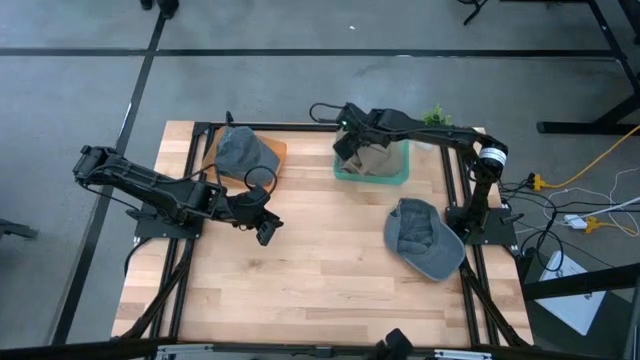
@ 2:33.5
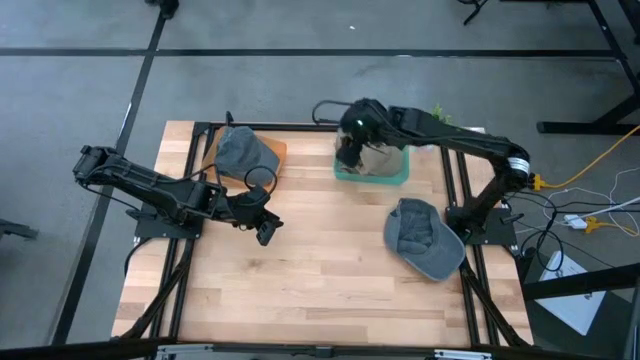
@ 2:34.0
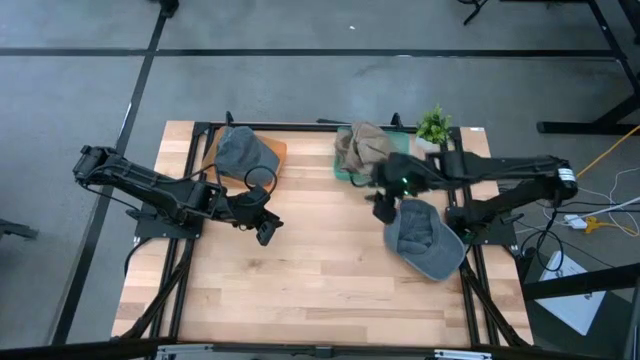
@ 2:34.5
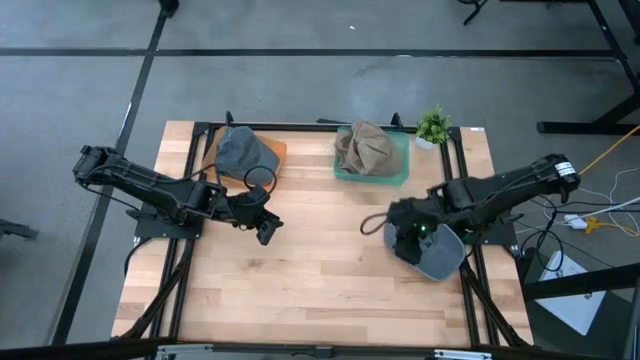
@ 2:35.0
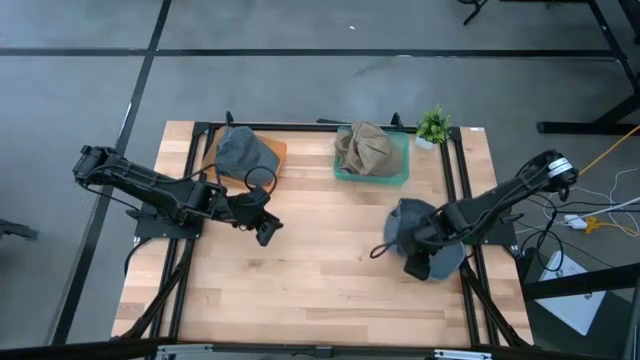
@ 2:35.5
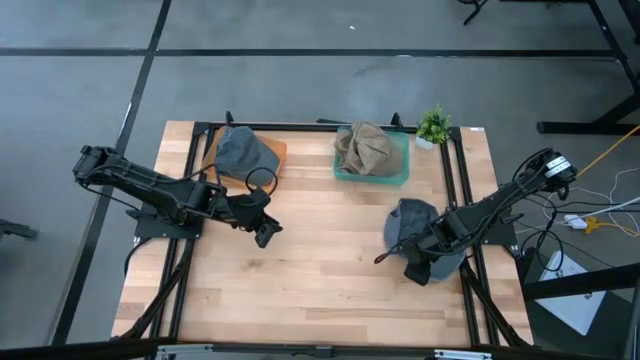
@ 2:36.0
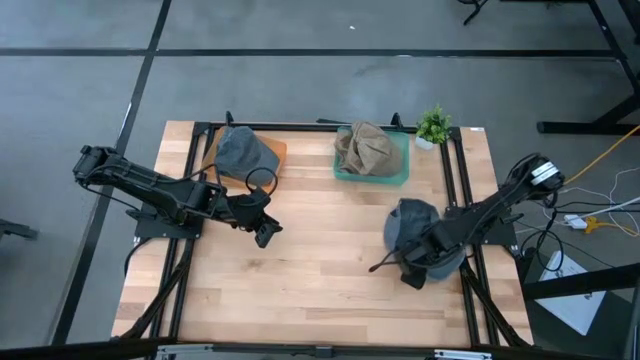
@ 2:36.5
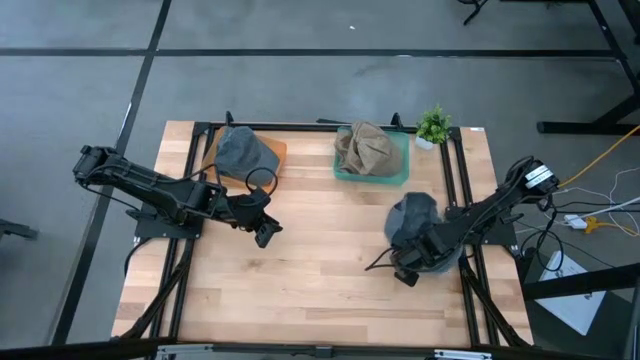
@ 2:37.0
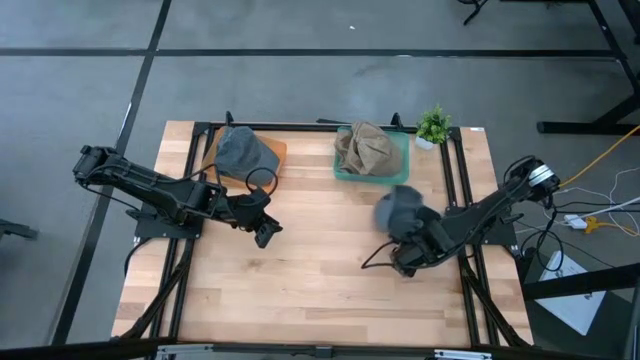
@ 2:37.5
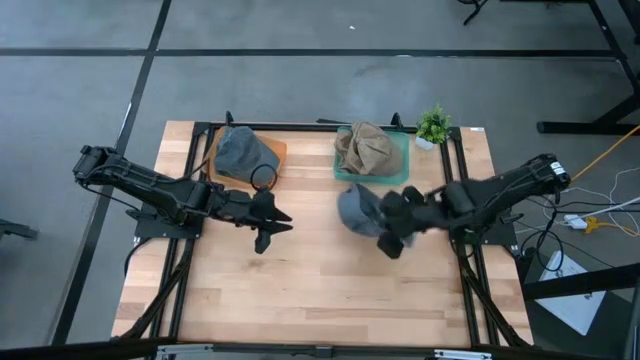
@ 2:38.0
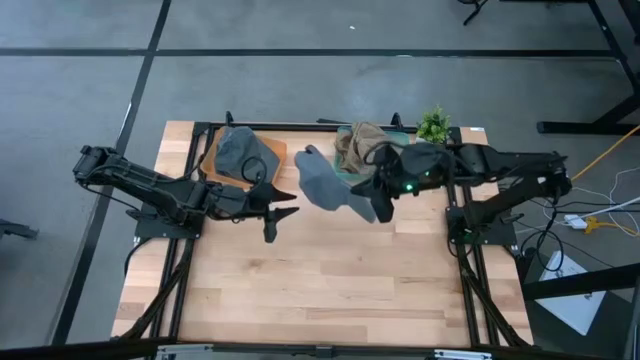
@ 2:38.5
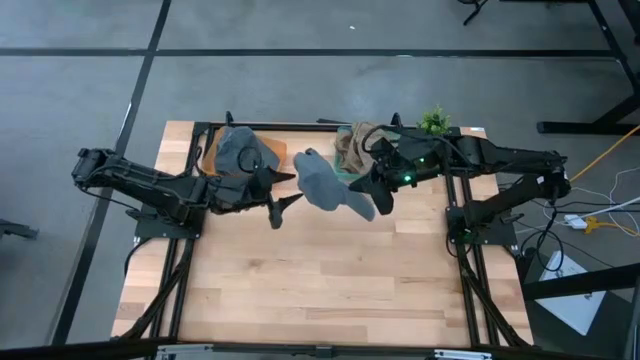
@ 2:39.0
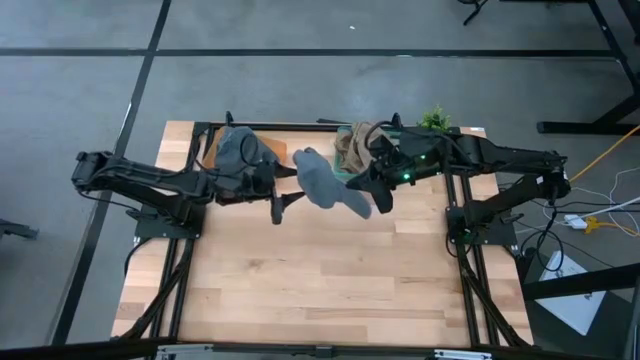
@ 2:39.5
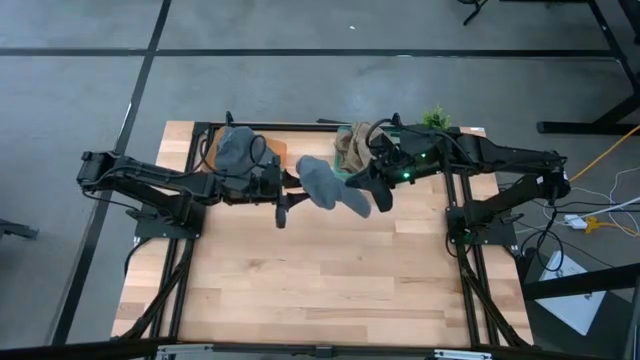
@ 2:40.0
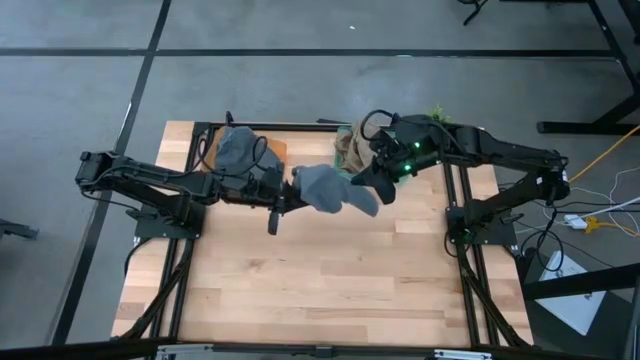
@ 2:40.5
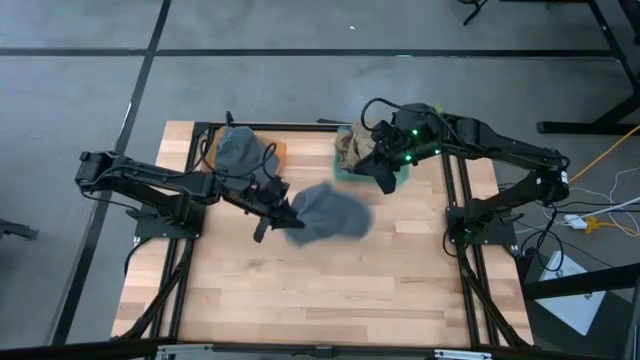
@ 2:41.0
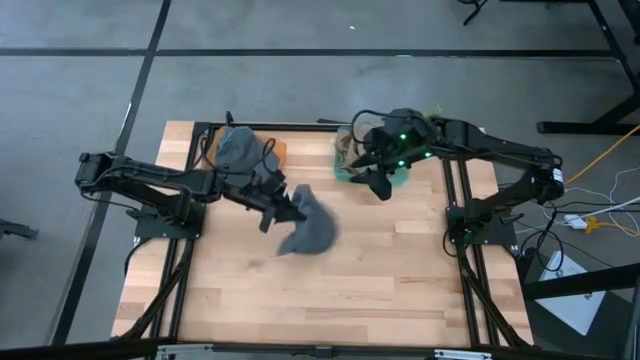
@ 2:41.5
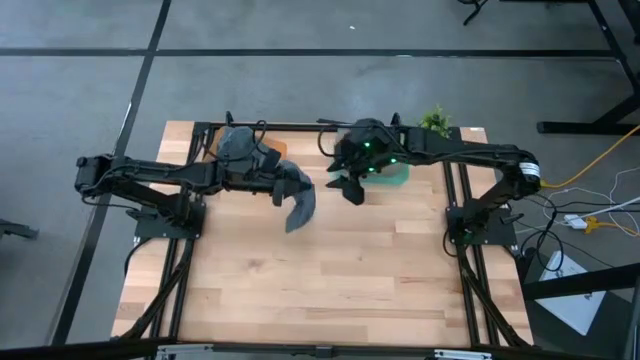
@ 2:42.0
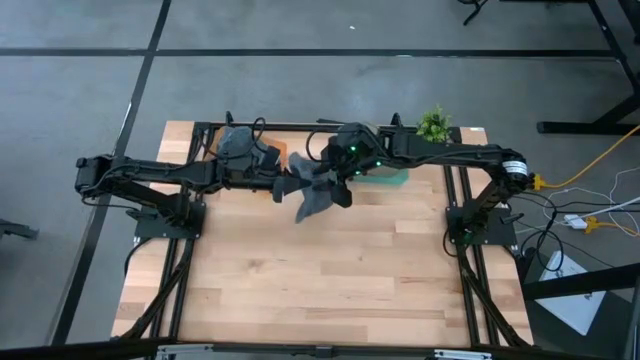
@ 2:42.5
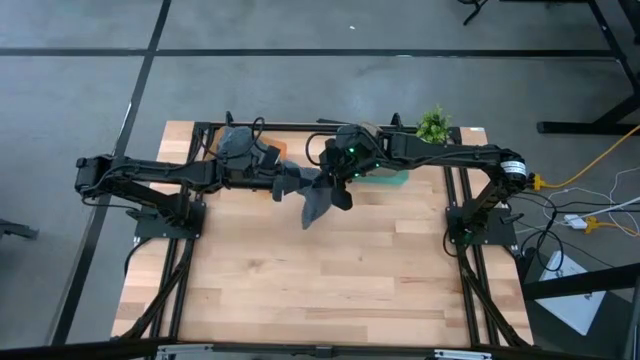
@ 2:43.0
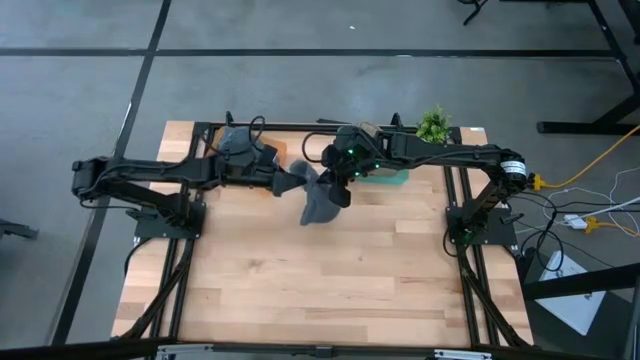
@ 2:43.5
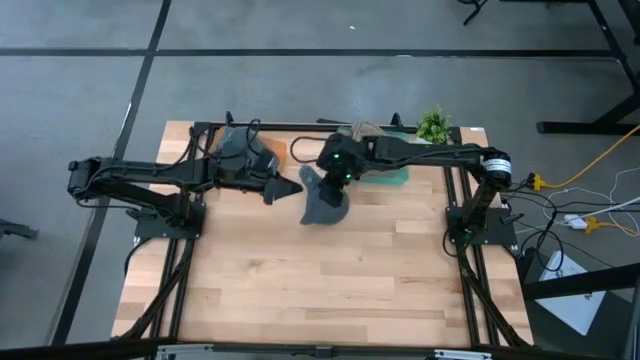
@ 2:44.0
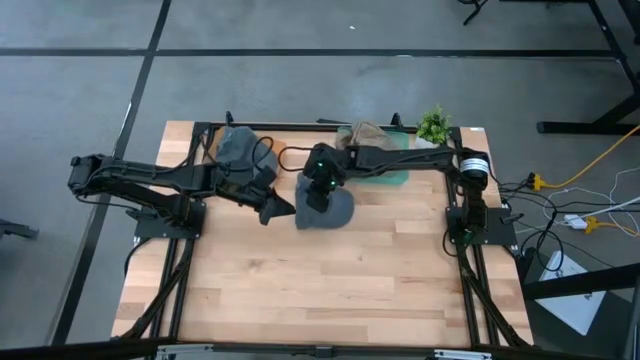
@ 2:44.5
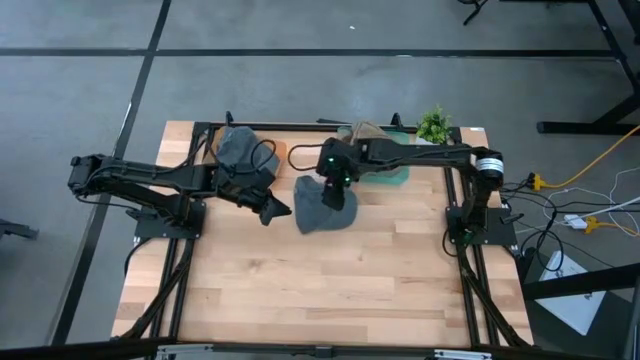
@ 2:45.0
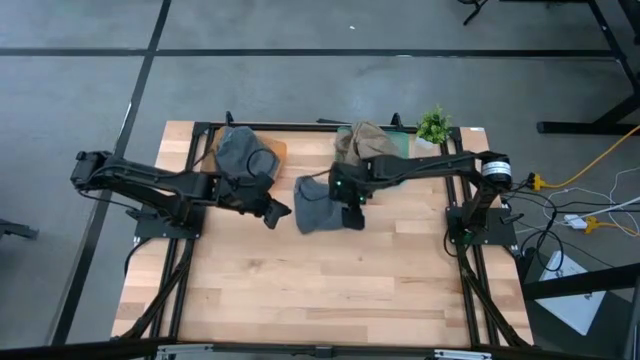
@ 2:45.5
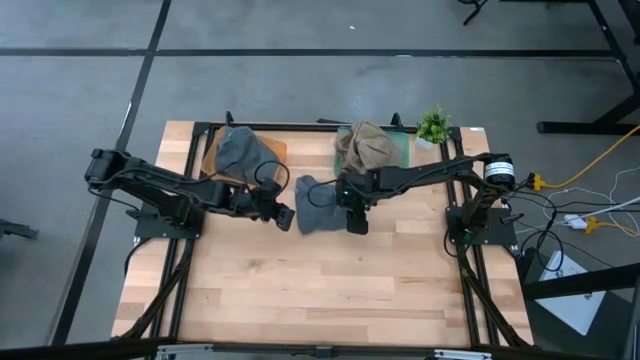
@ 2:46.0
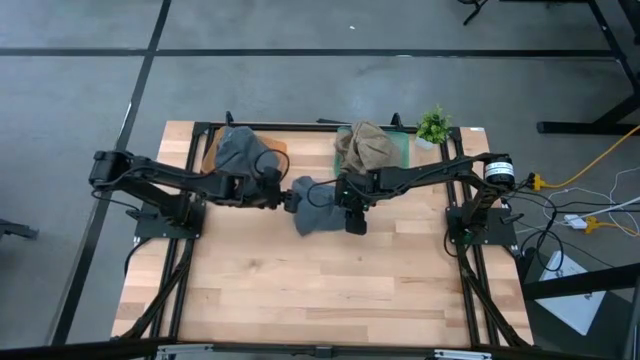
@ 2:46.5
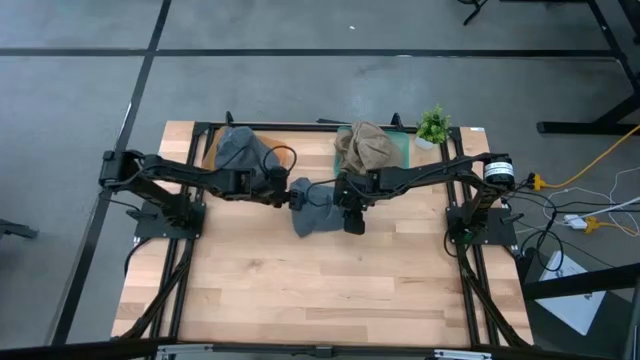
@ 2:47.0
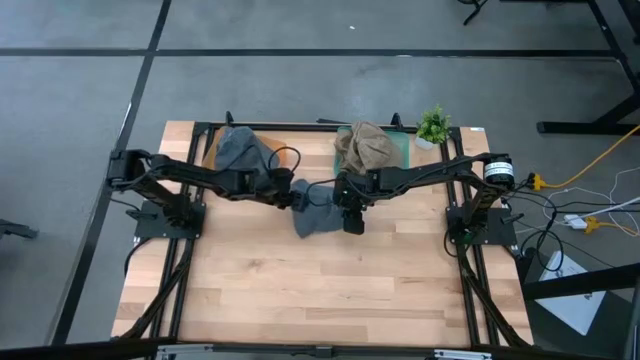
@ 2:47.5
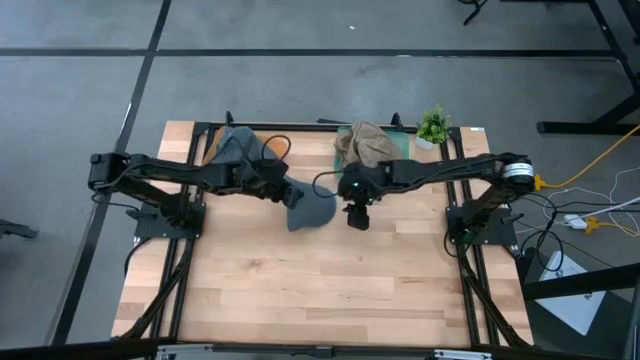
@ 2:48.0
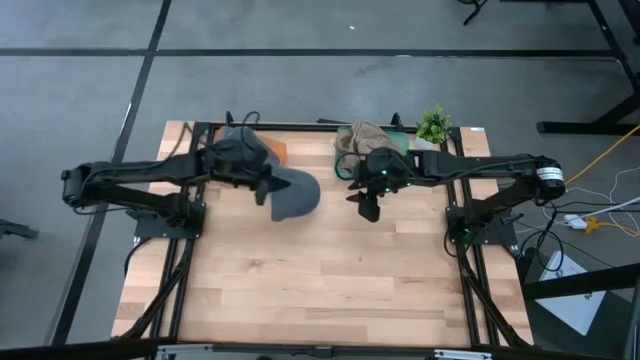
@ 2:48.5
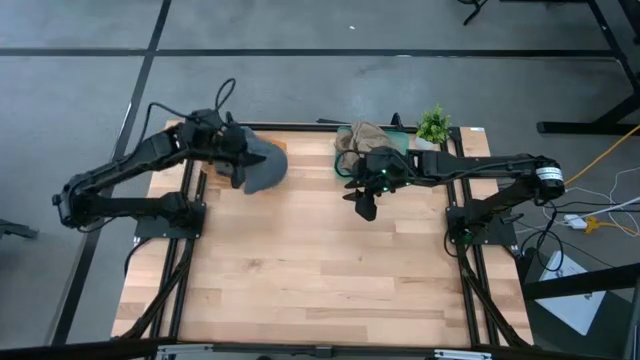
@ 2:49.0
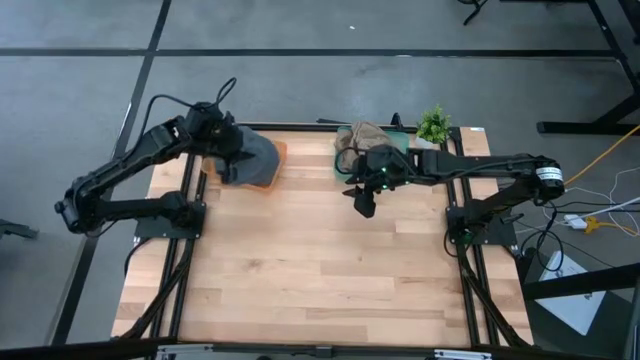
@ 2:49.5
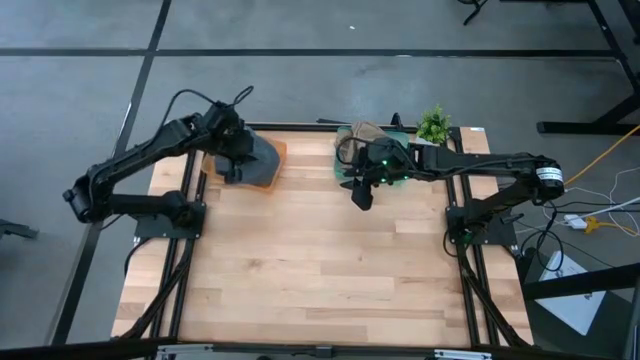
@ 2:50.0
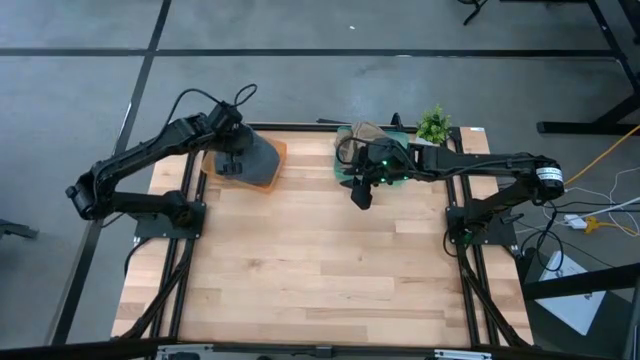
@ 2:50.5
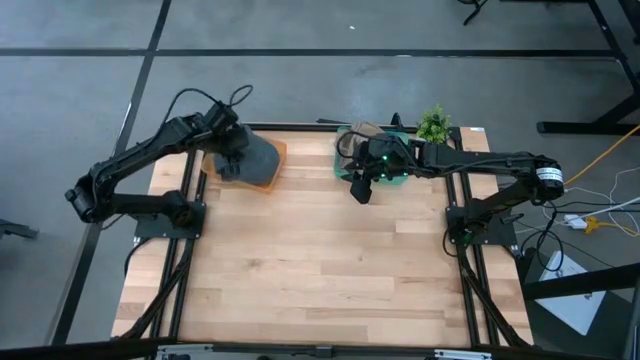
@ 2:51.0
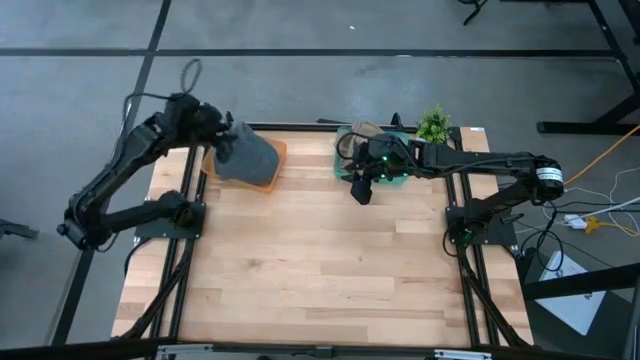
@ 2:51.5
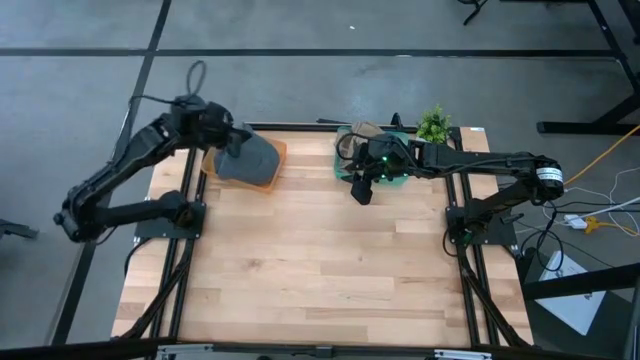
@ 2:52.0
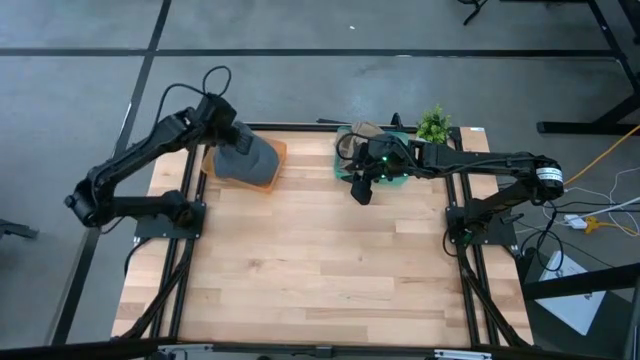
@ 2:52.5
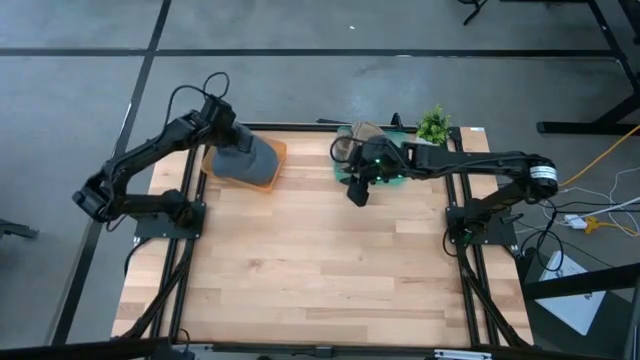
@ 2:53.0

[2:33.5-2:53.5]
Task: Pick & Place hat
Put the gray cap into the orange bin
